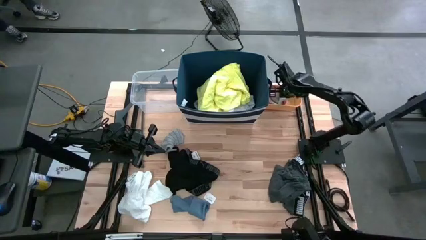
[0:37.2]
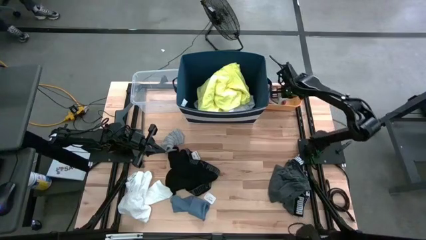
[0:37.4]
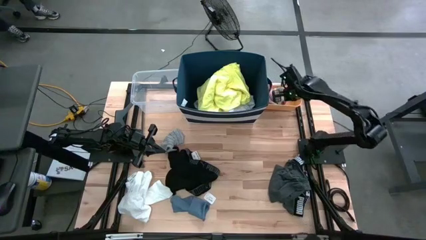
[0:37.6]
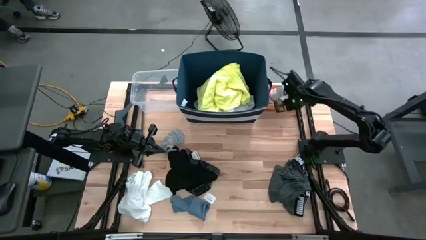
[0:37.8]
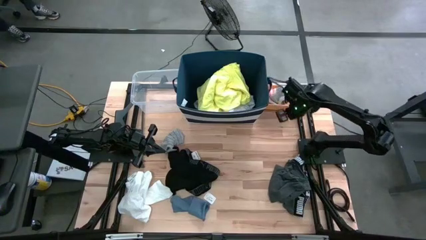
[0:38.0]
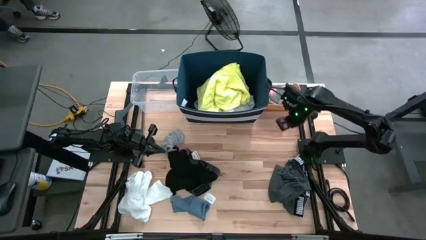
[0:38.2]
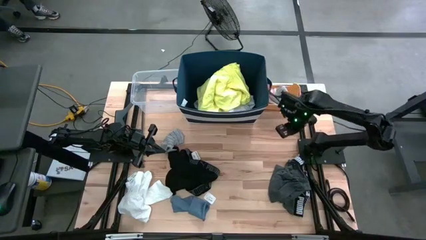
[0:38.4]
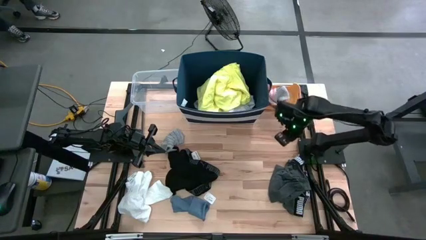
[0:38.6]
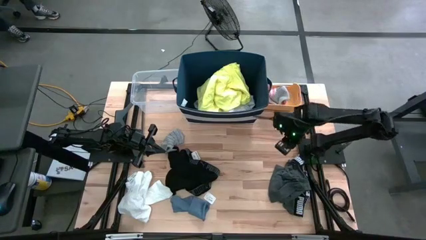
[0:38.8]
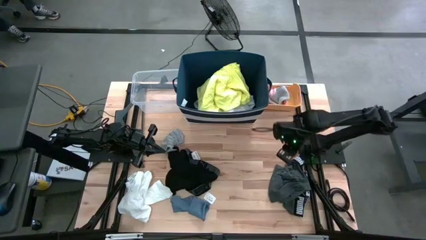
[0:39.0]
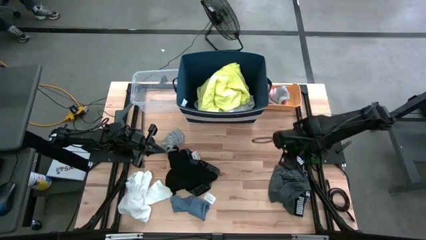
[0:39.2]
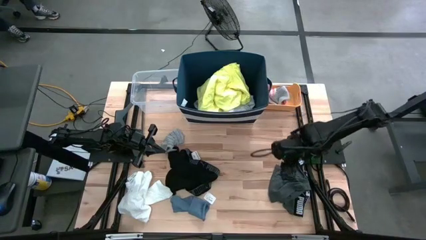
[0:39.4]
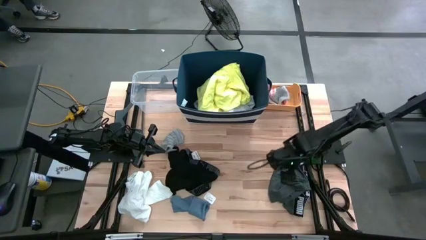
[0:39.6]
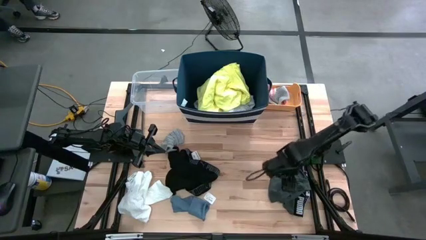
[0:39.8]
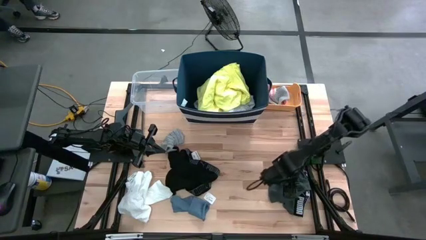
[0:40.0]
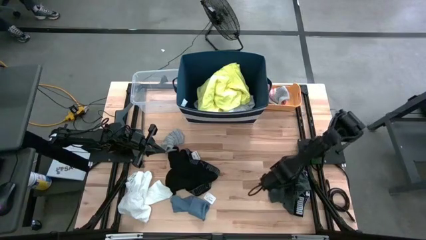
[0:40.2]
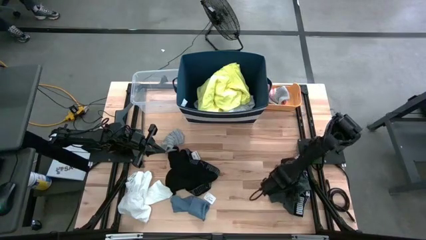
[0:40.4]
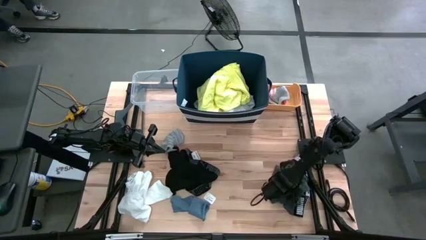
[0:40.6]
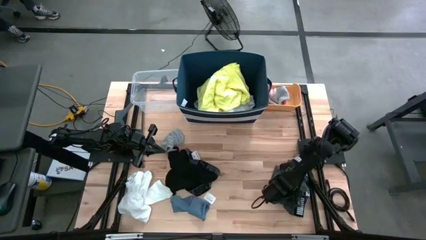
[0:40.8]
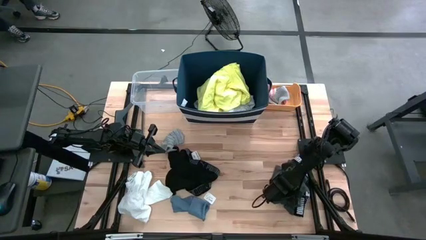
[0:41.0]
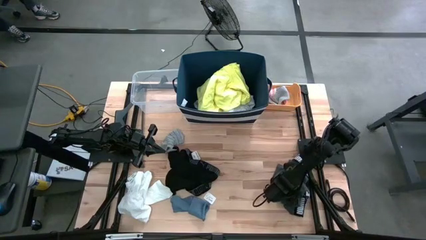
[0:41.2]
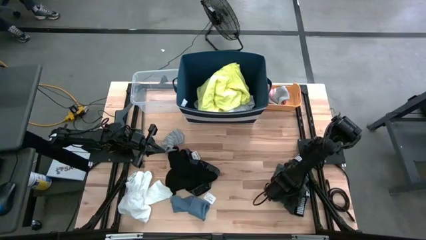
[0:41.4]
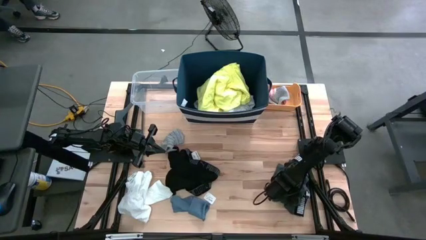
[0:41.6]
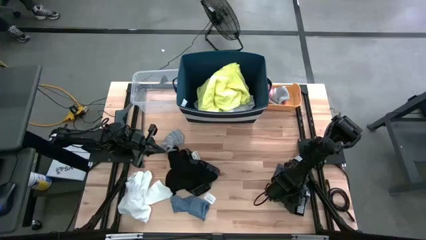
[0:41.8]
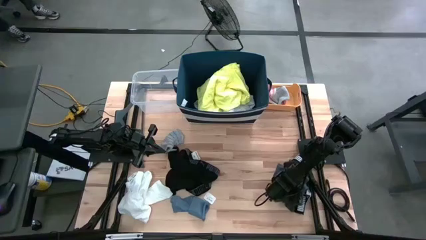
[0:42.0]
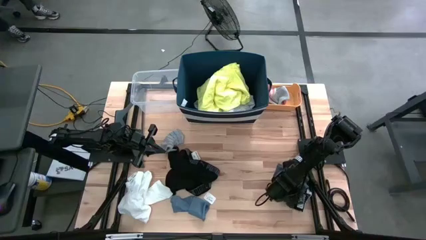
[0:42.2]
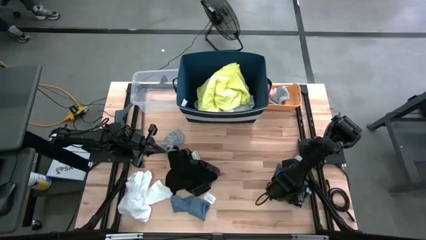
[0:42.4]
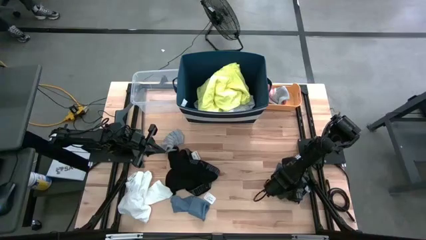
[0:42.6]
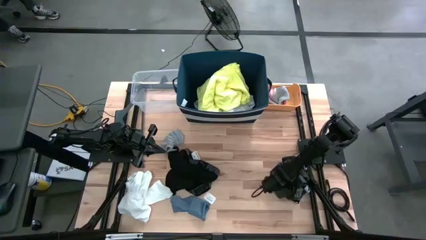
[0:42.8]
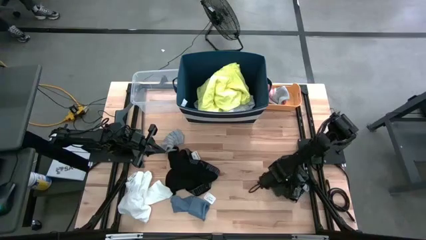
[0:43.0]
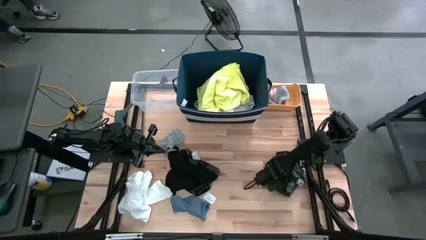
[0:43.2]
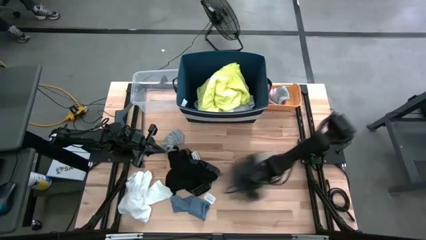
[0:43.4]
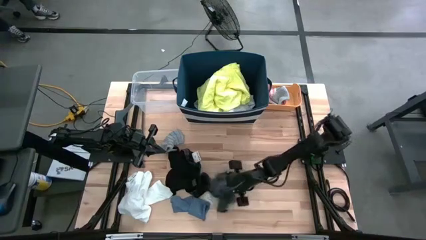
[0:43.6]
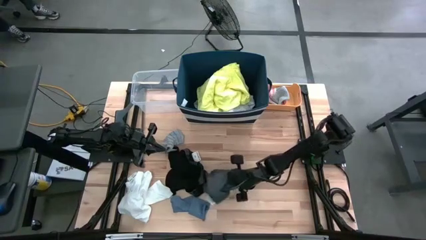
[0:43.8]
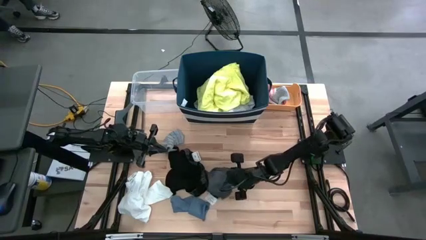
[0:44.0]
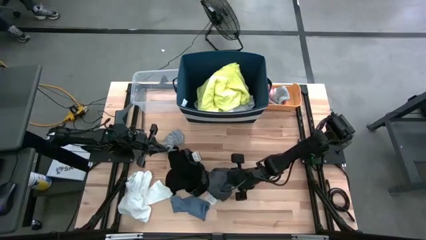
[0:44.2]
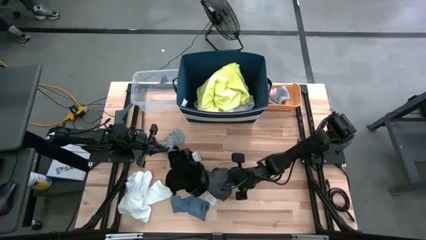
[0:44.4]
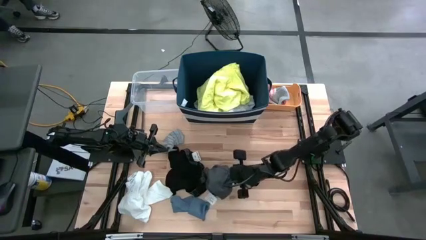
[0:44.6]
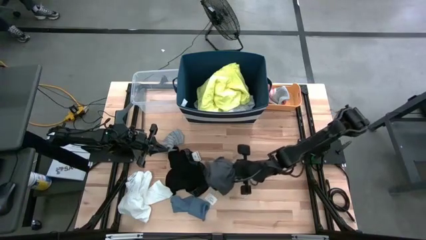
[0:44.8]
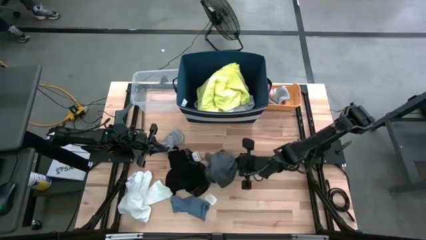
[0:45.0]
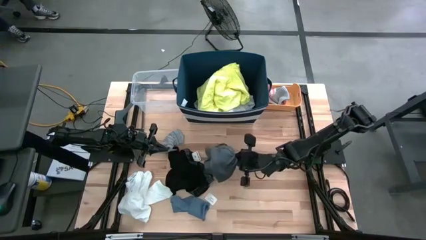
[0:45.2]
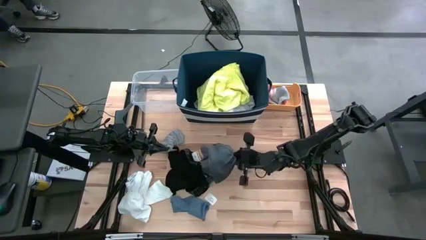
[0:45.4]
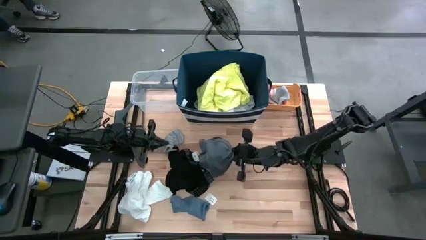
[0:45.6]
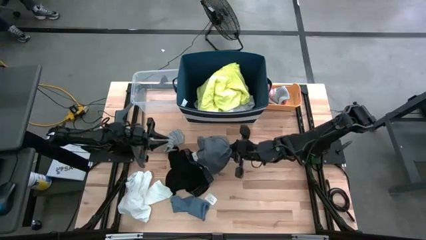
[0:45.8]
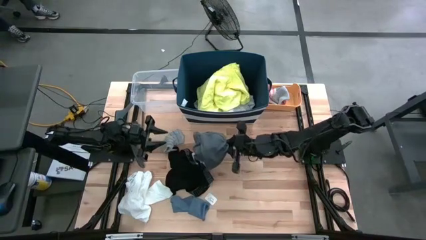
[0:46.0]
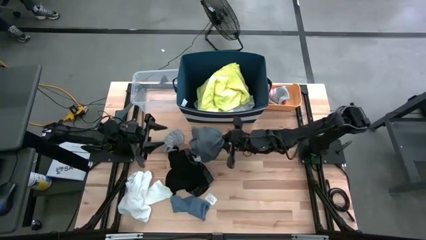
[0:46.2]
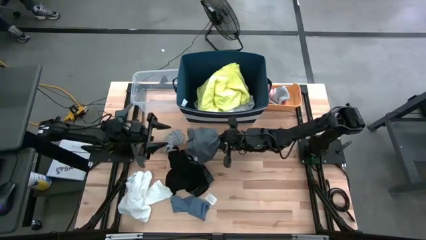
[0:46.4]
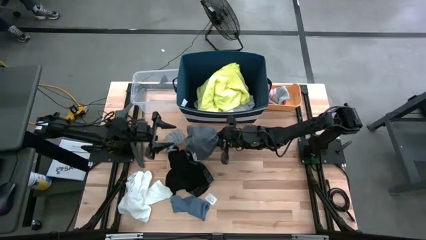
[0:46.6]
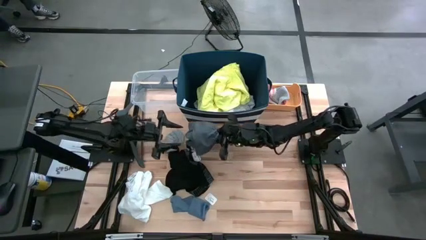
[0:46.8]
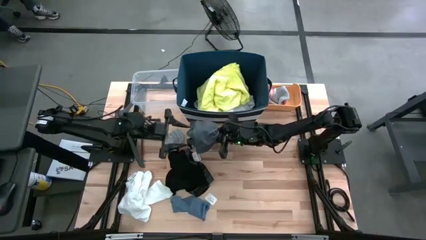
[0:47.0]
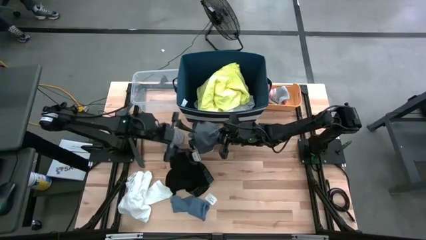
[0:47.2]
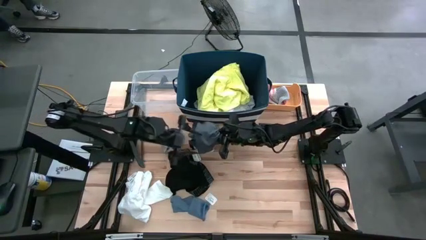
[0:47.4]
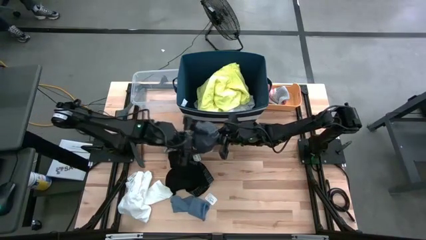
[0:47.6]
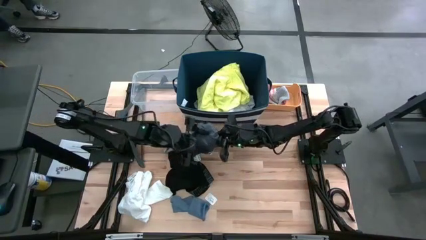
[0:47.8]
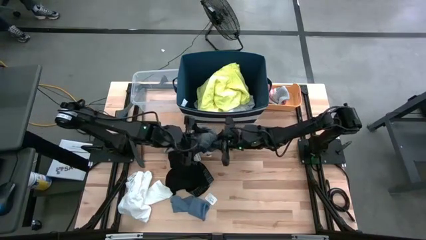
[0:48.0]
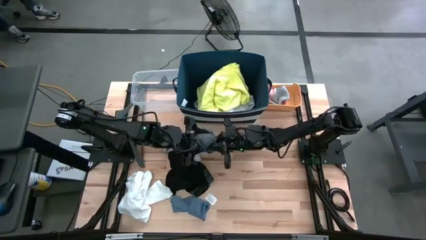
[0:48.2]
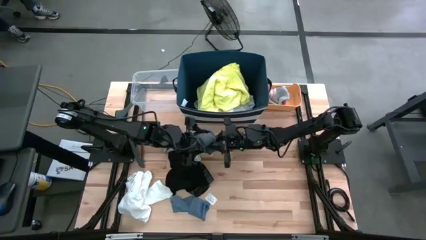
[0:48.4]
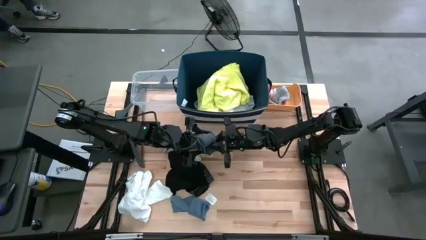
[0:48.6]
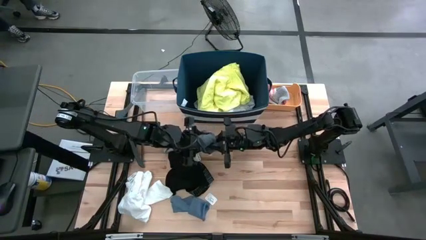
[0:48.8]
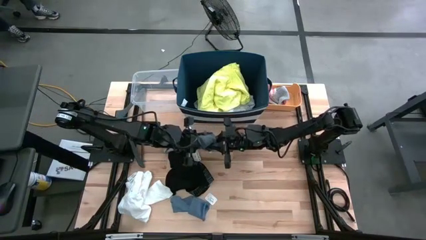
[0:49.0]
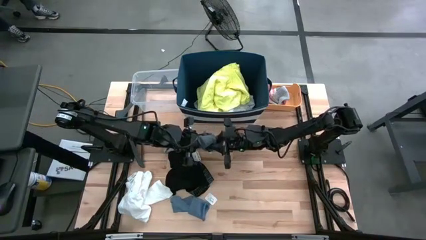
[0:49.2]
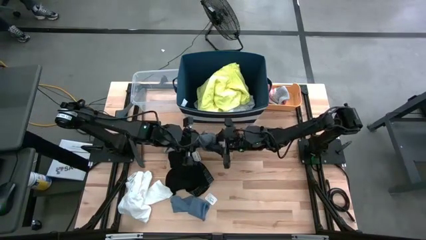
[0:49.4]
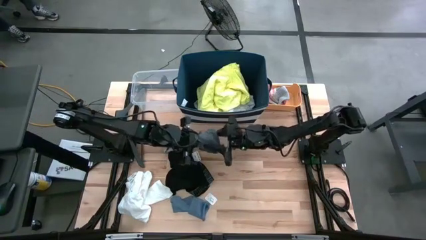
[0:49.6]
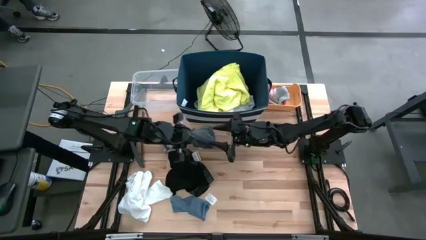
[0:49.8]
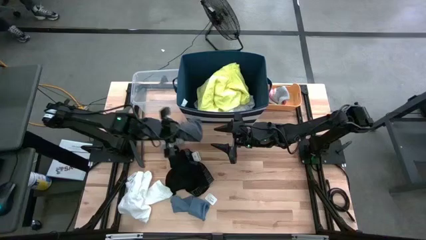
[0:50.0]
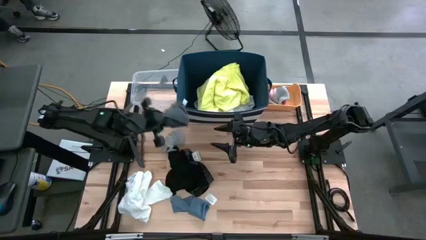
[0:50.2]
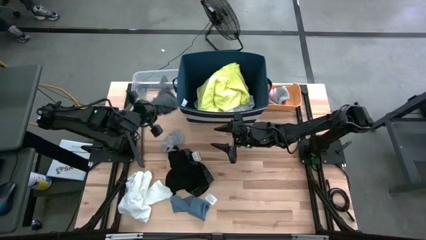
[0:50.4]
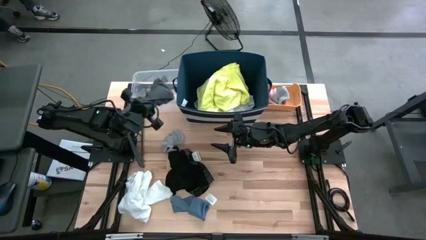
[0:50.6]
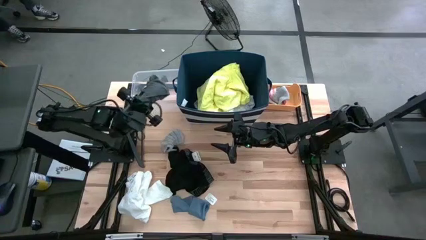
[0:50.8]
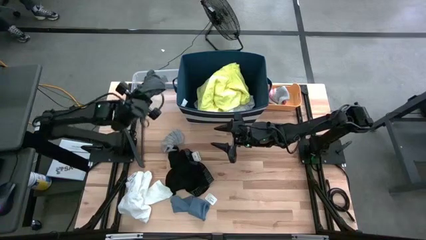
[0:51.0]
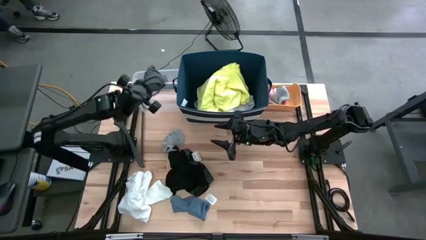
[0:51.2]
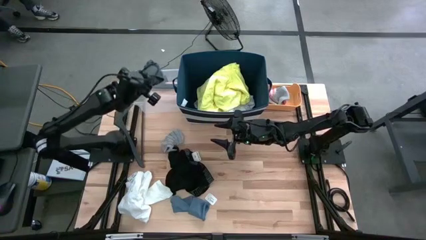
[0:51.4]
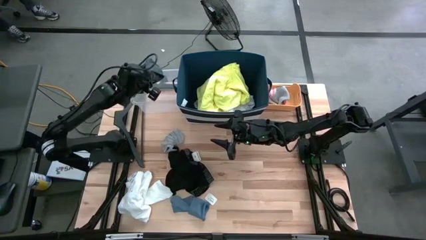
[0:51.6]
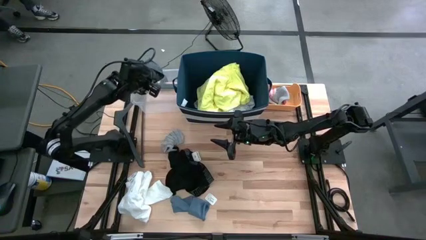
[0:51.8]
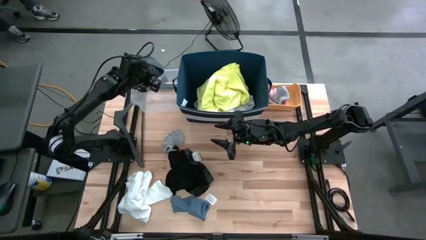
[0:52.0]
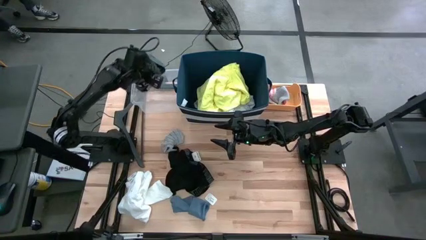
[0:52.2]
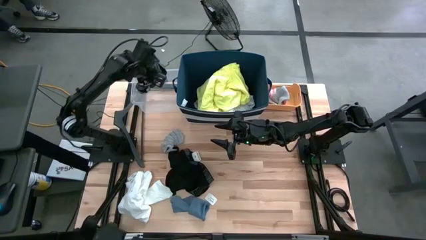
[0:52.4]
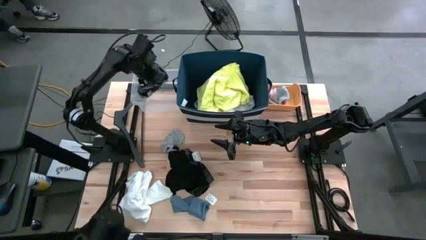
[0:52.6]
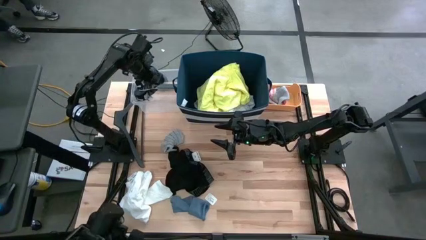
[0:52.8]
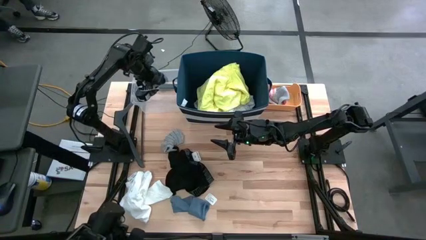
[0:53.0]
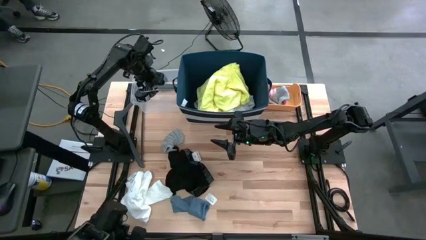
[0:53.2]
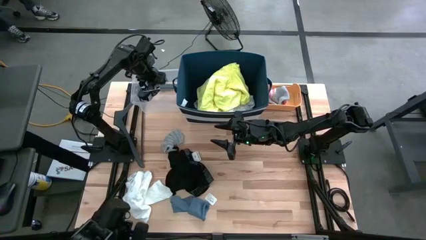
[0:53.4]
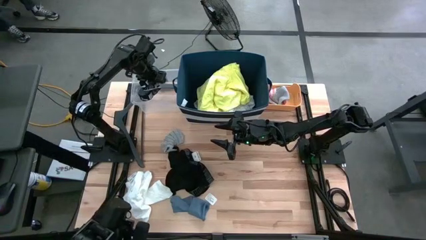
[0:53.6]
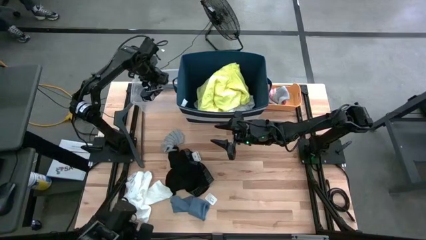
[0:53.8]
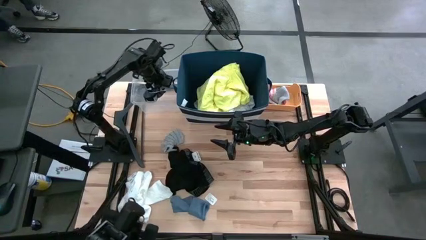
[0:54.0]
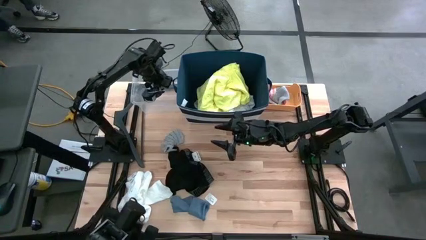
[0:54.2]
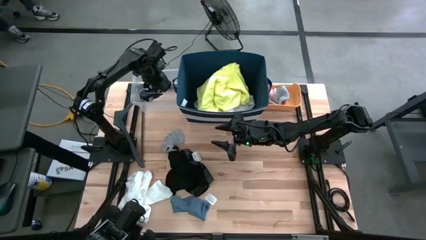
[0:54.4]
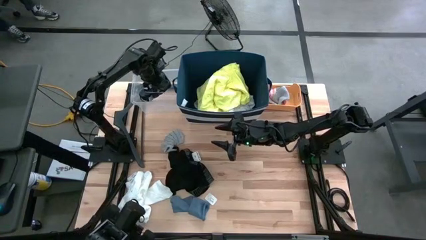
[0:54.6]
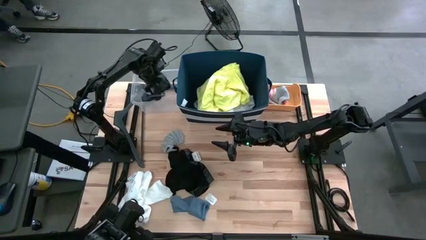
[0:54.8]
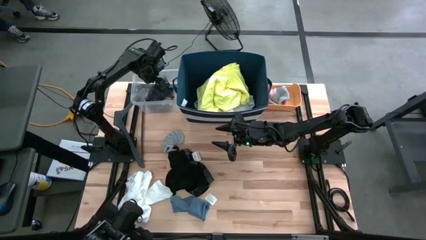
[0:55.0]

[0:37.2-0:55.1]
Task: Pick & Place Cloths
Put the gray boxer shorts into the transparent container
